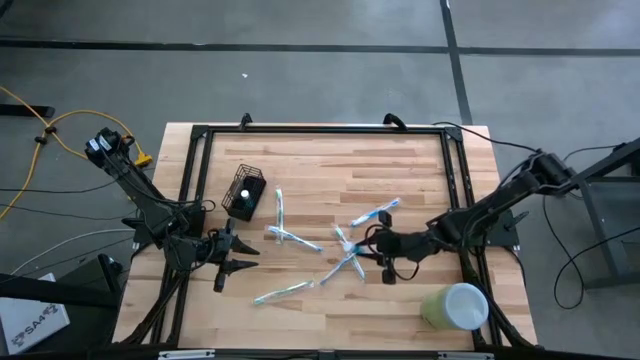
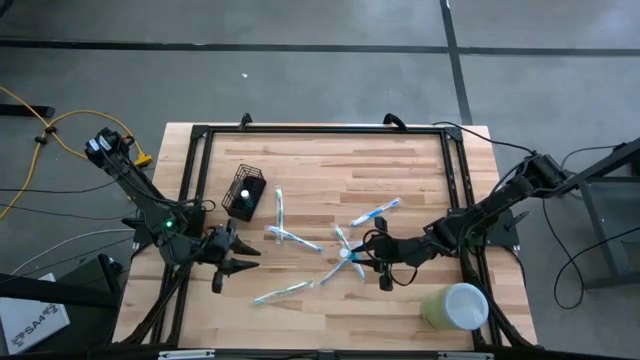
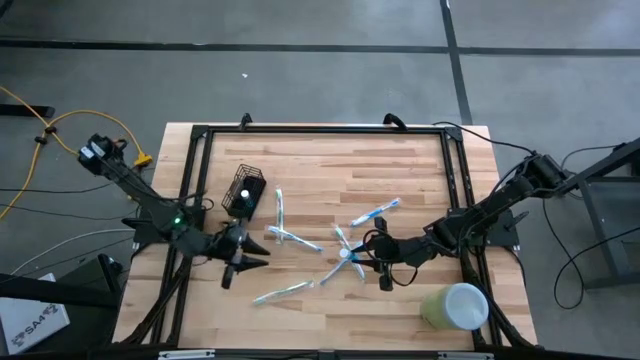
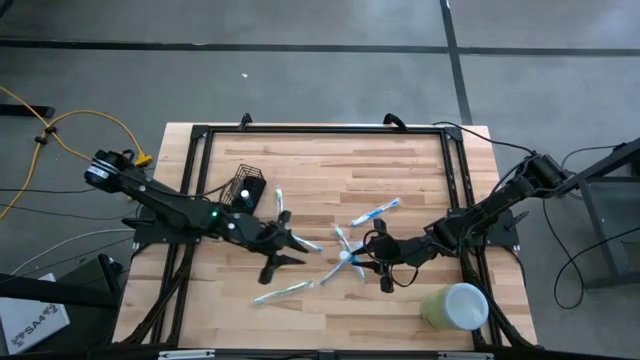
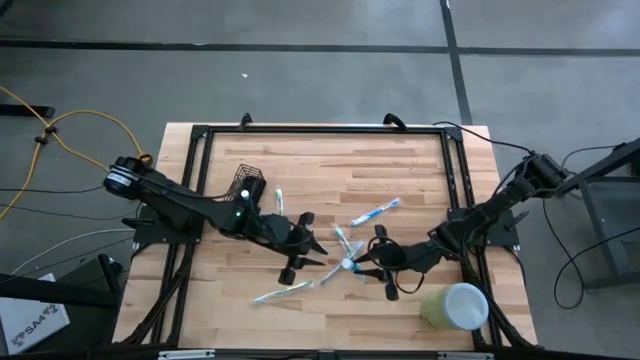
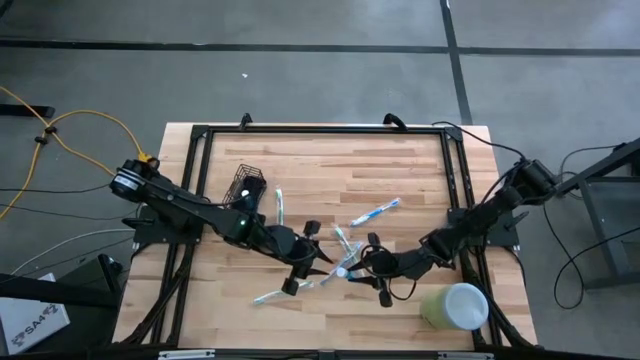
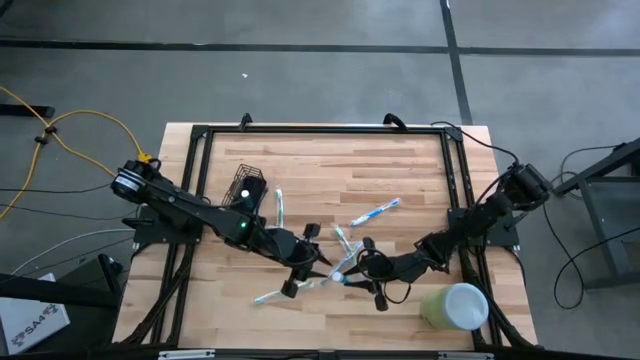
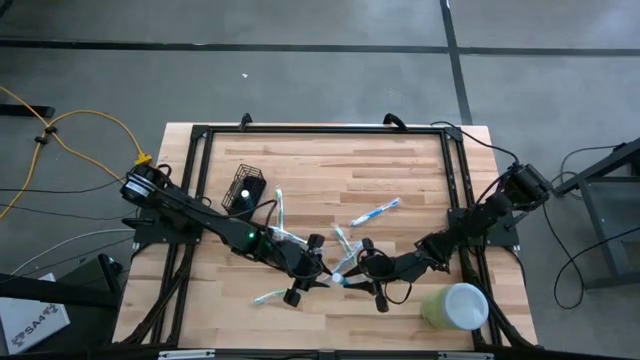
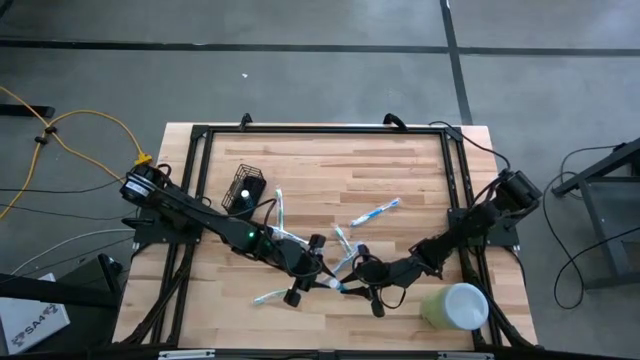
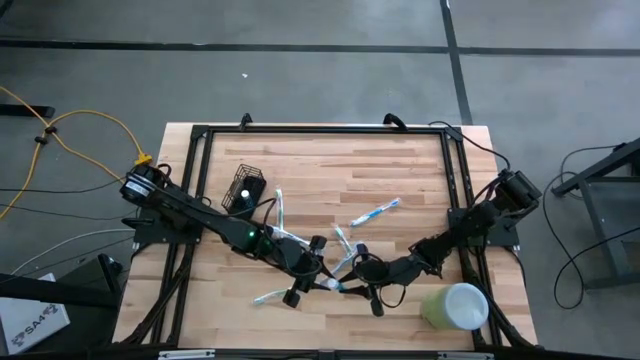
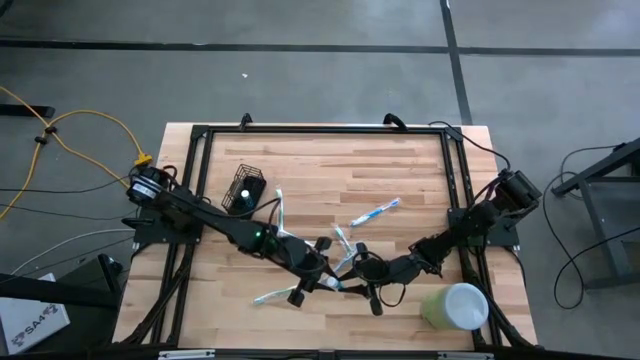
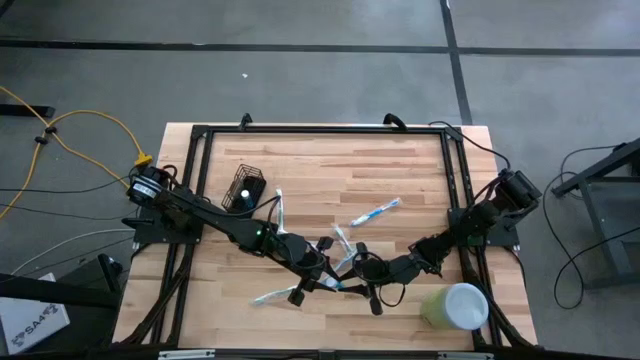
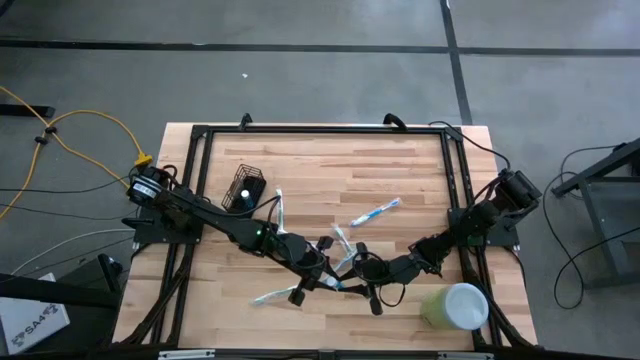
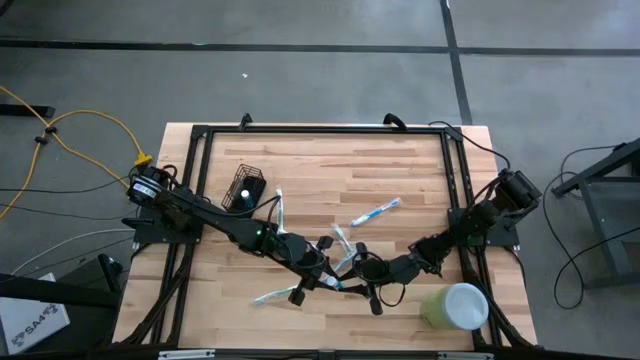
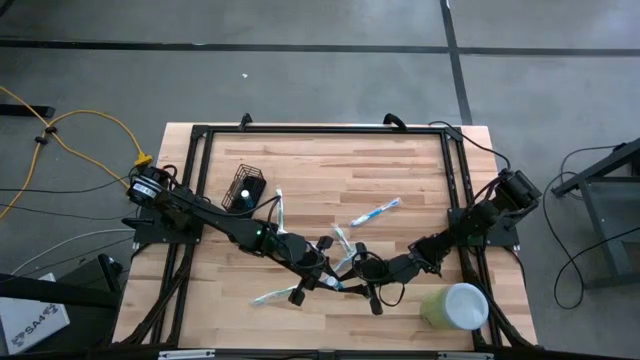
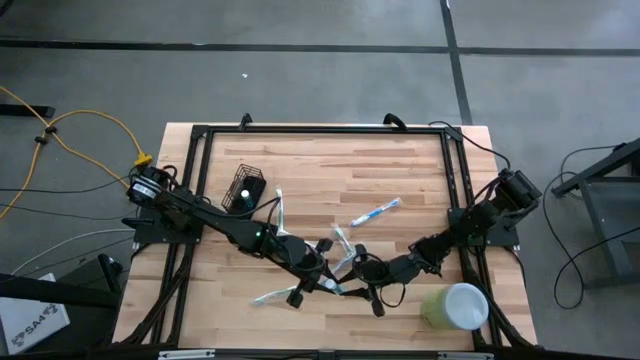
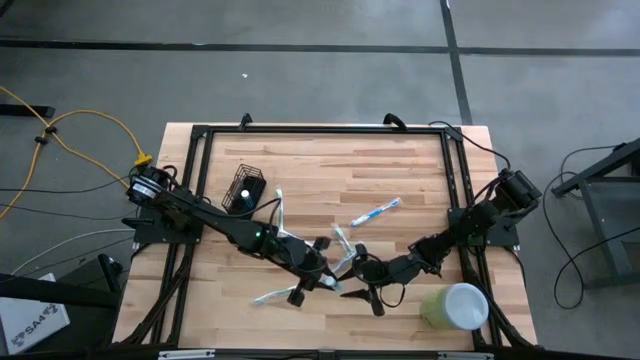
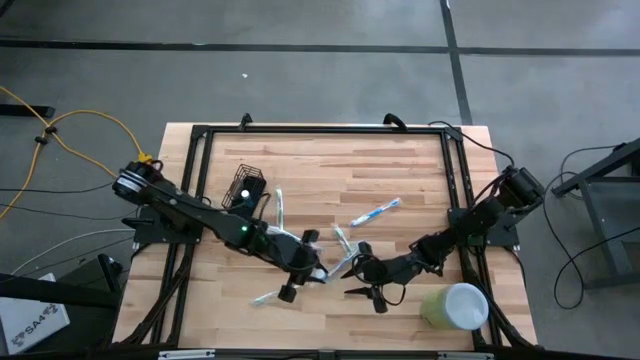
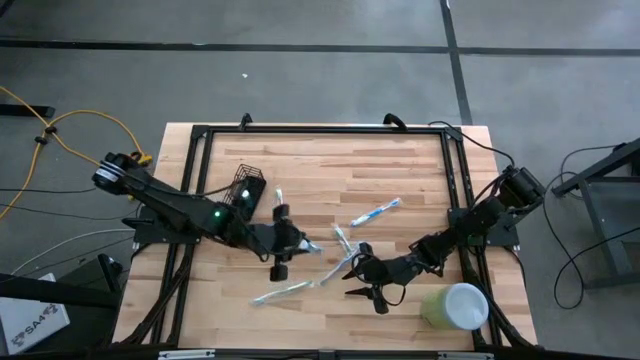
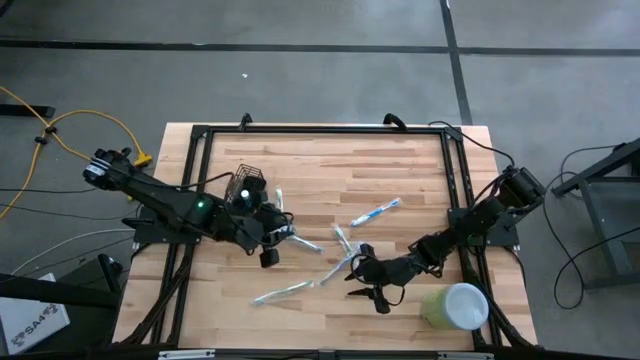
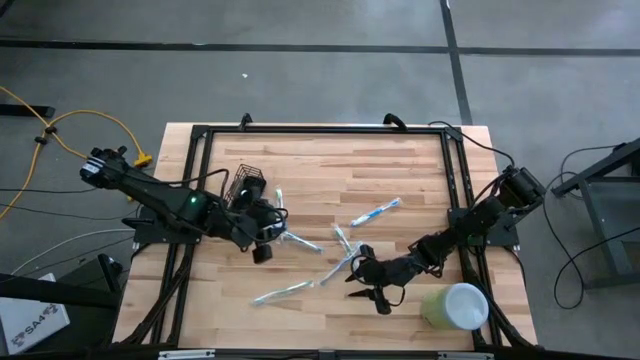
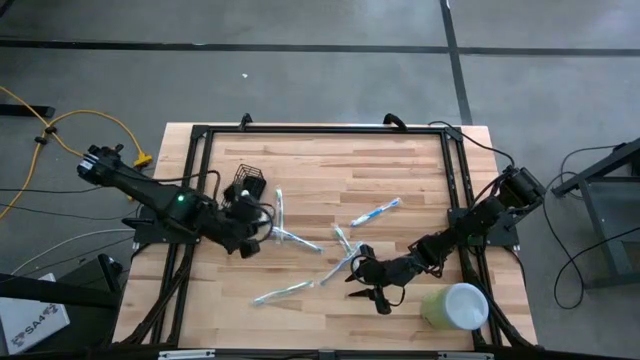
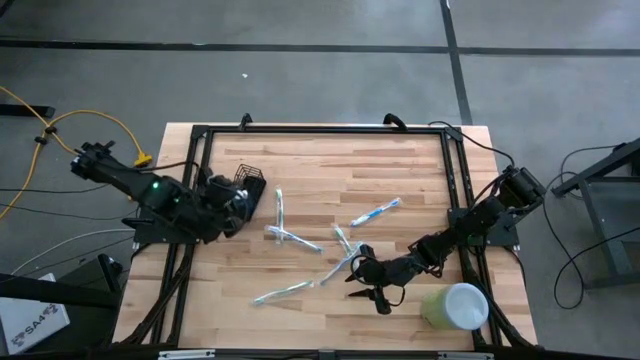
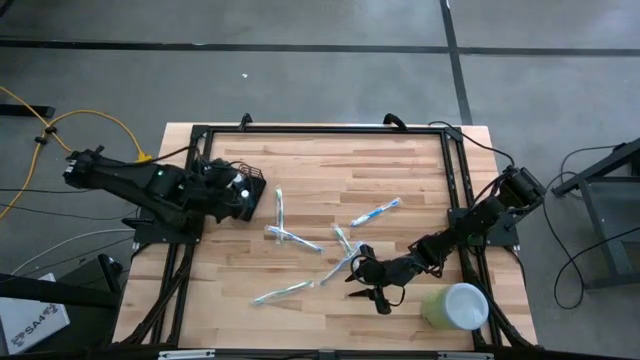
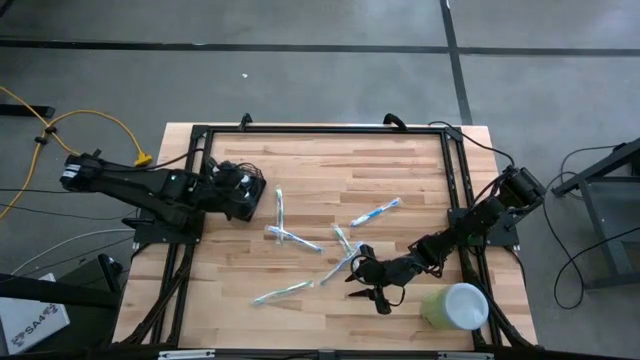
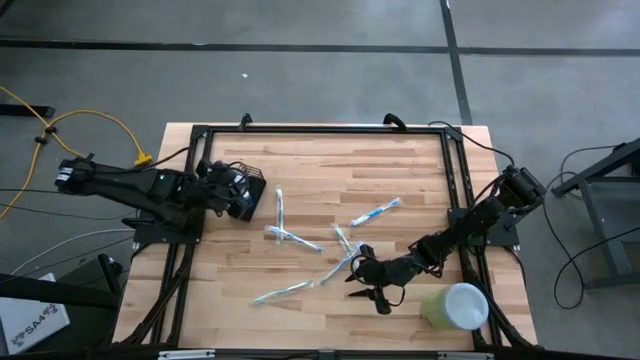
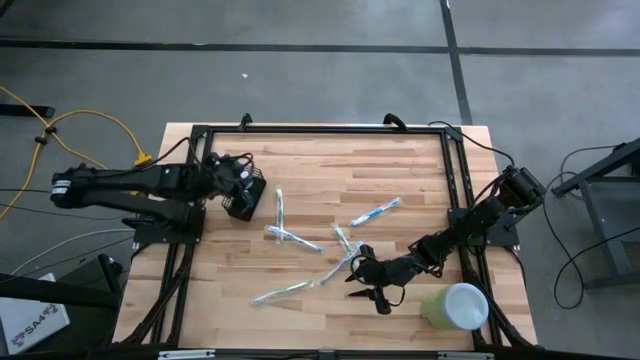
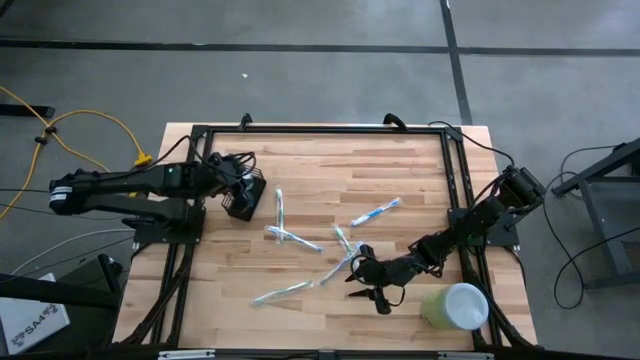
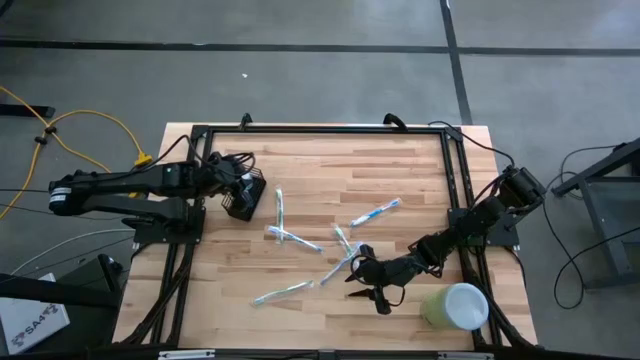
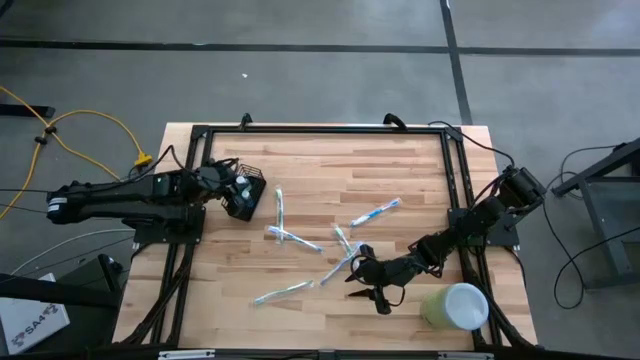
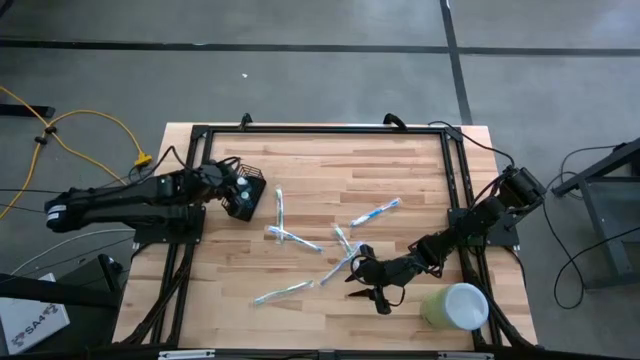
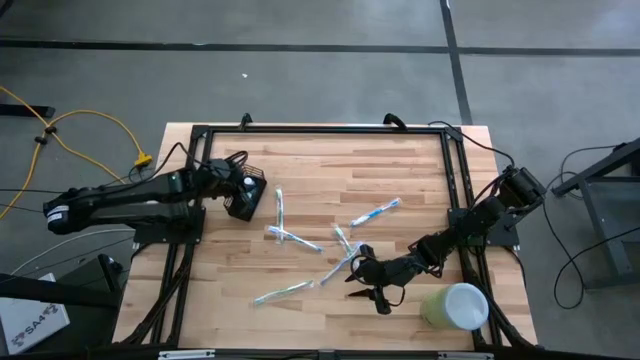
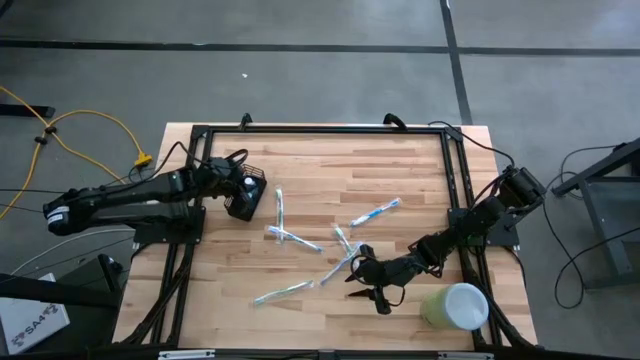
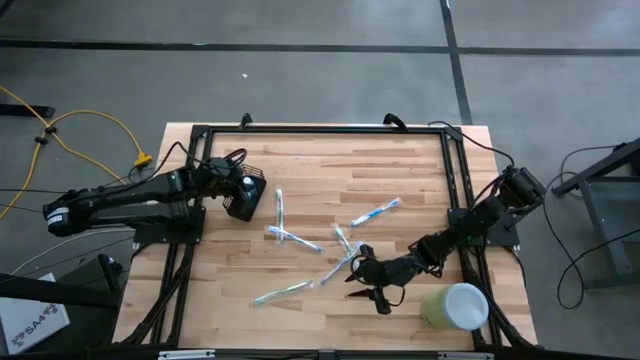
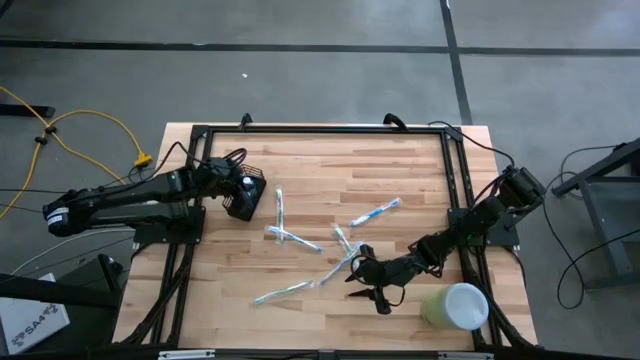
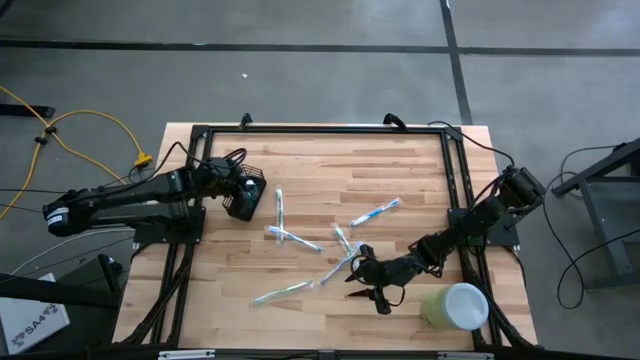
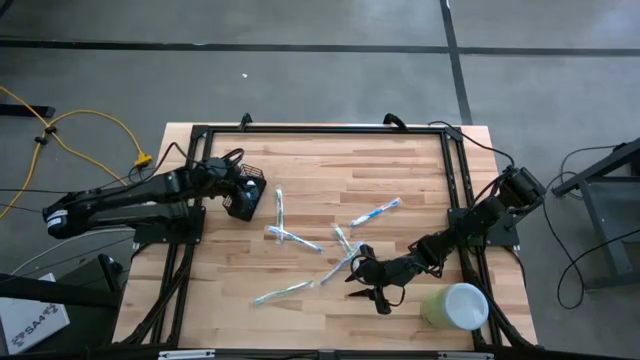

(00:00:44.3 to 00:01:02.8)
Task: Pick & Place toothbrushing station
Put the blue mouthwash into the black wire organizer

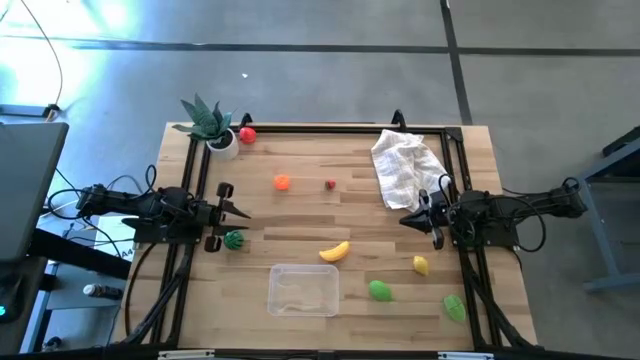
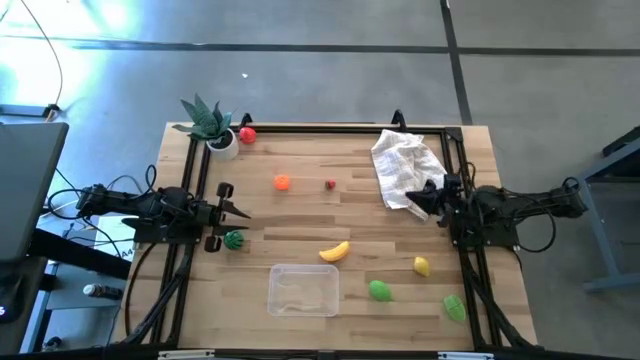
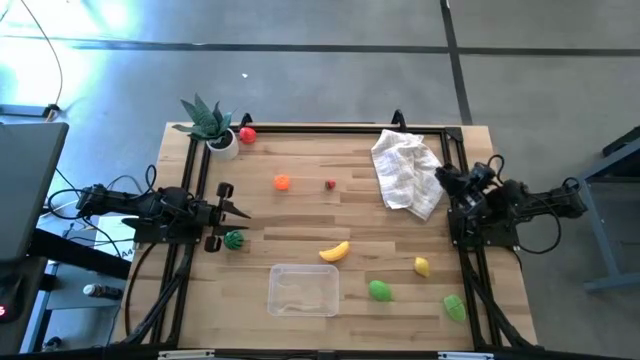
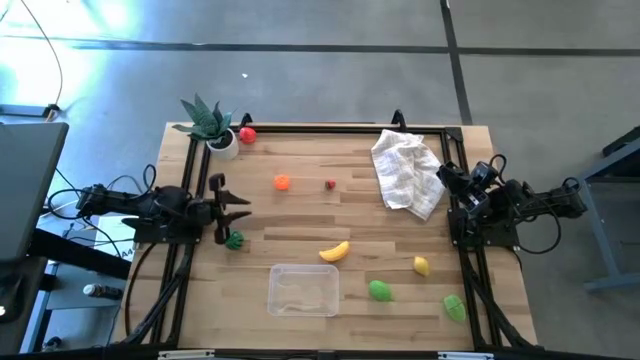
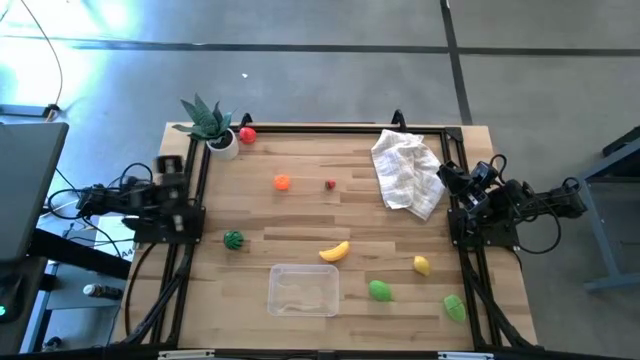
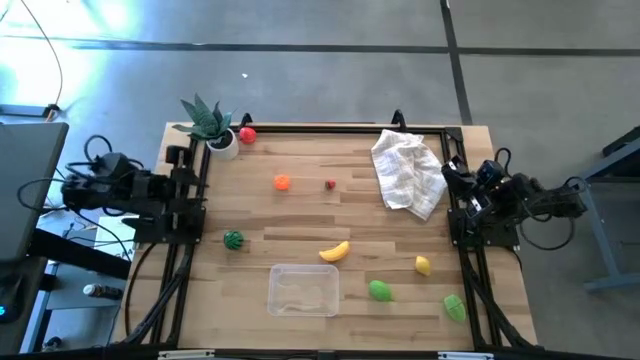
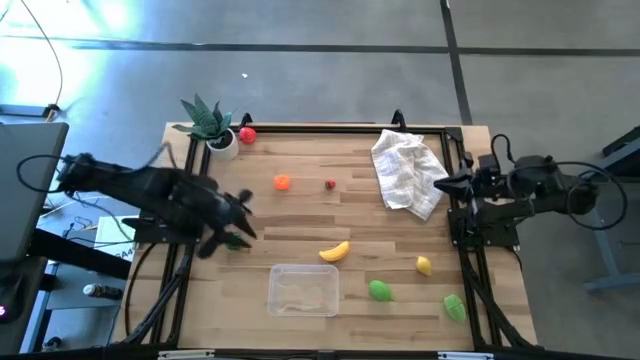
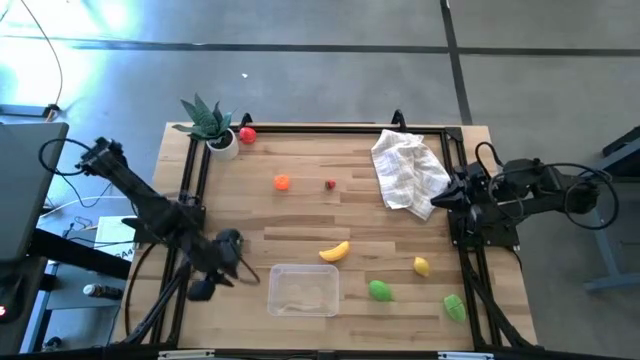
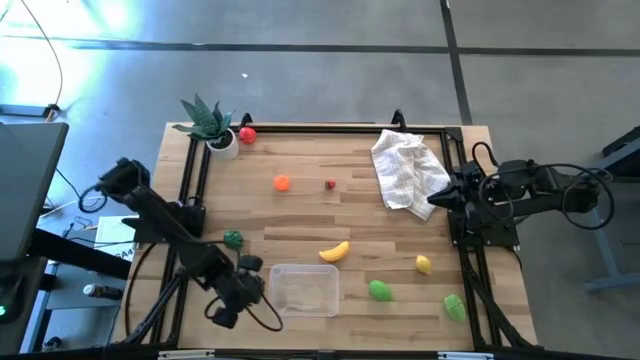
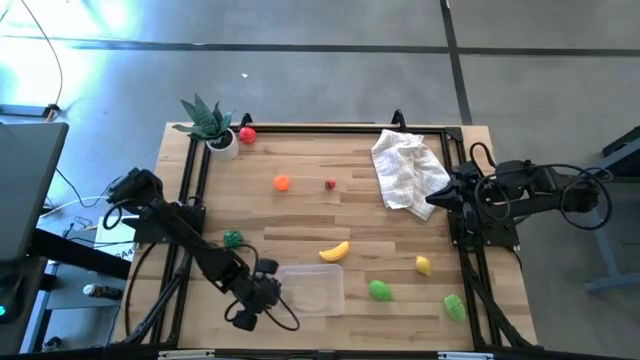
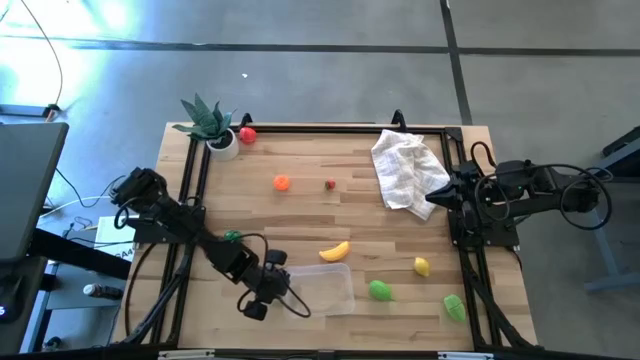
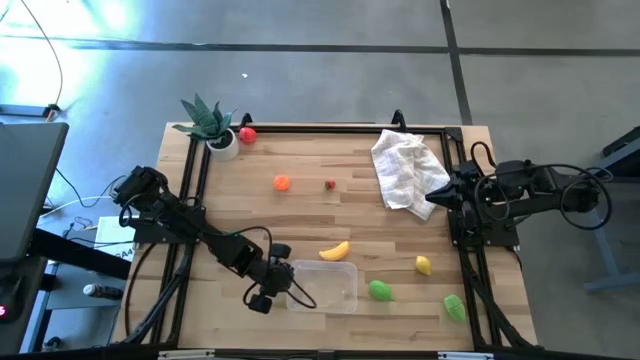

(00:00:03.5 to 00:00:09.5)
Task: Pick and placing Produce into tupperware
Adjust the bin on the table
